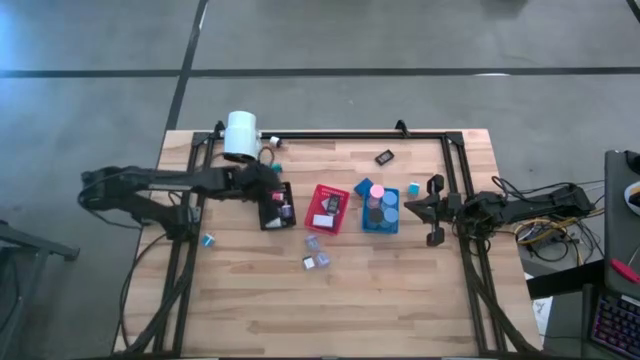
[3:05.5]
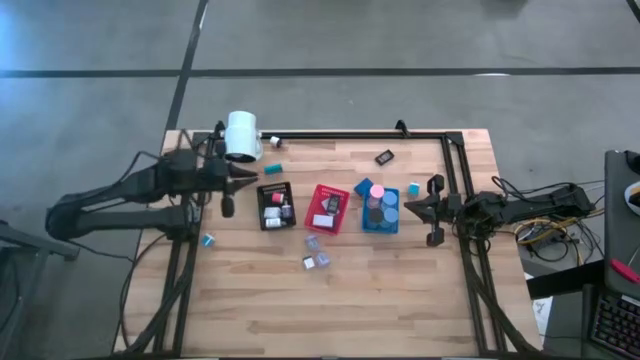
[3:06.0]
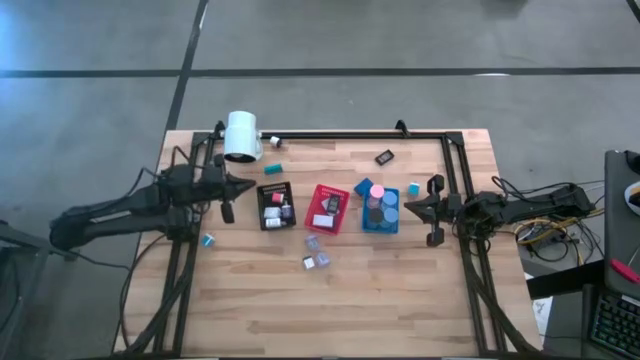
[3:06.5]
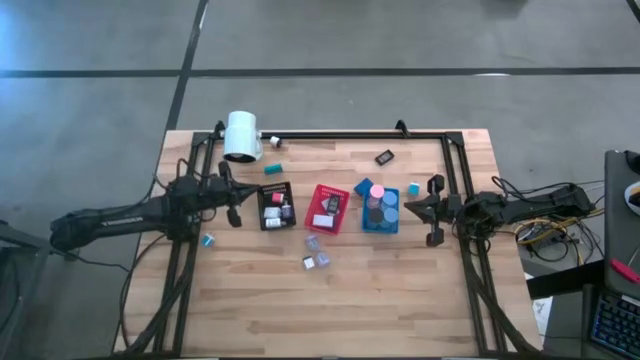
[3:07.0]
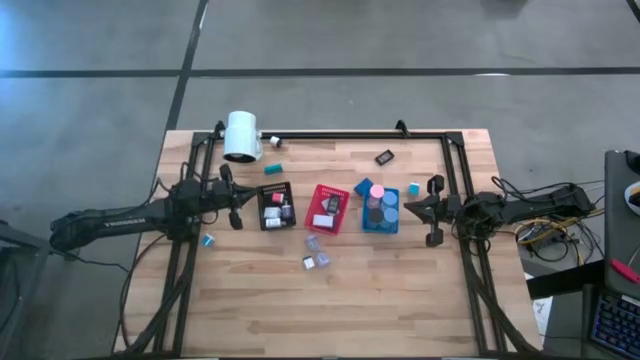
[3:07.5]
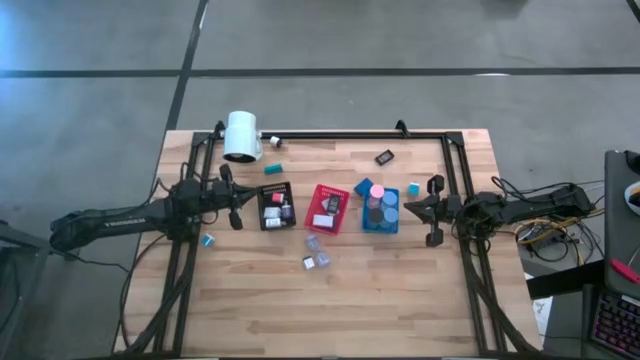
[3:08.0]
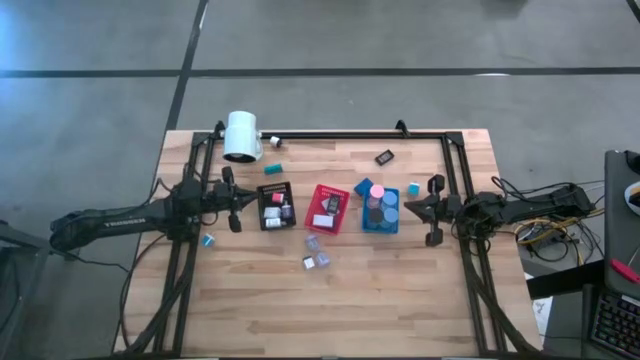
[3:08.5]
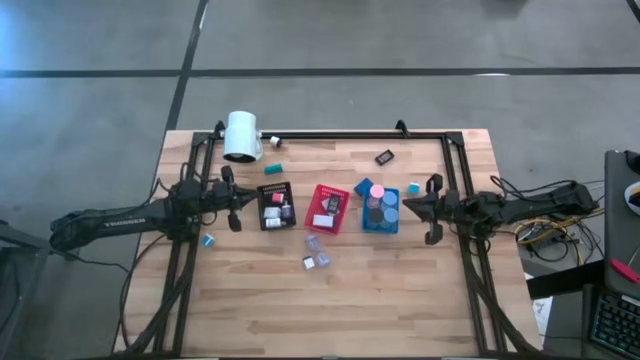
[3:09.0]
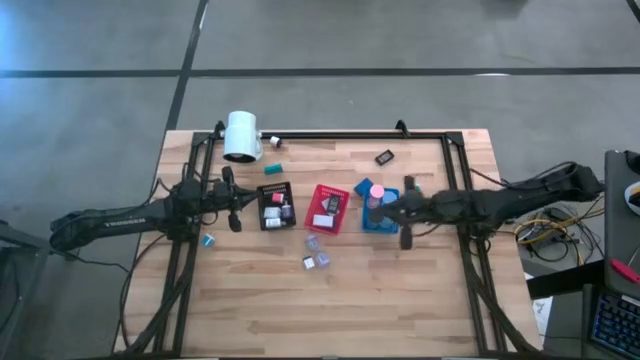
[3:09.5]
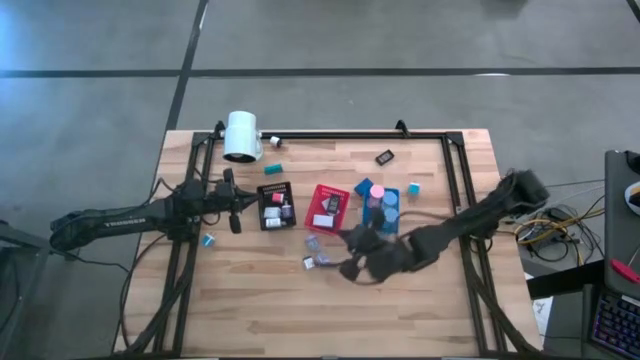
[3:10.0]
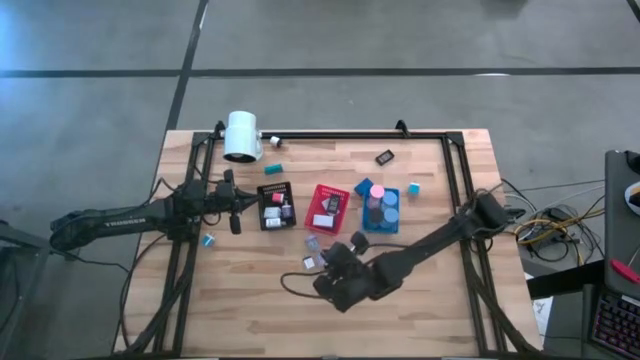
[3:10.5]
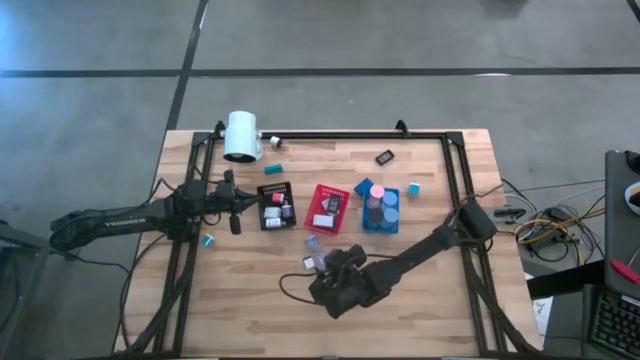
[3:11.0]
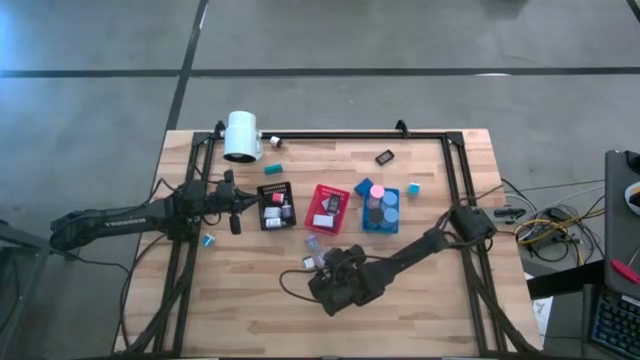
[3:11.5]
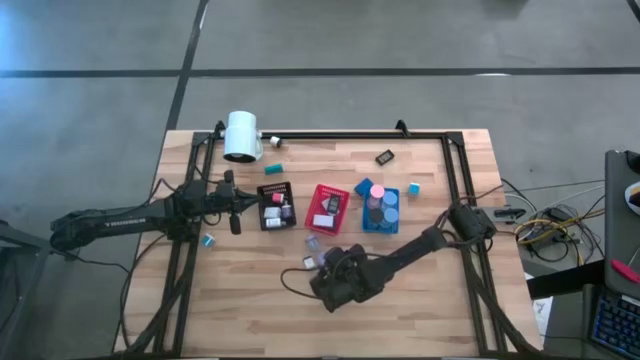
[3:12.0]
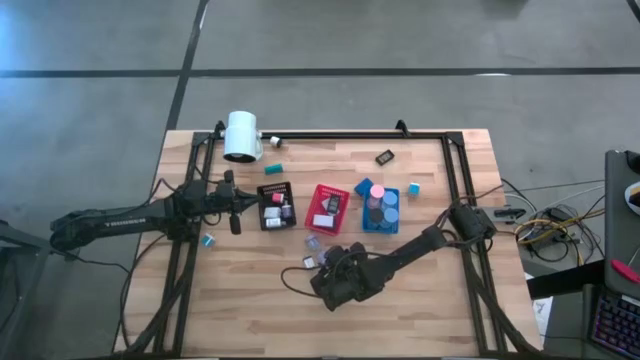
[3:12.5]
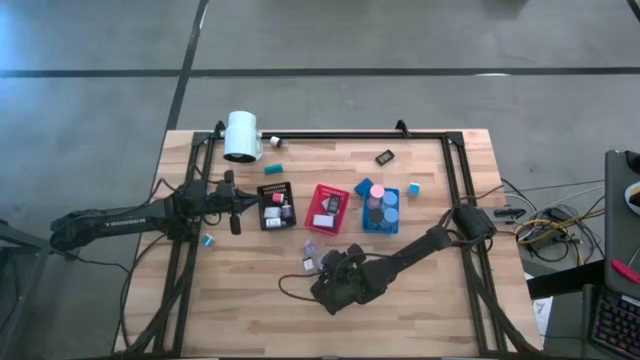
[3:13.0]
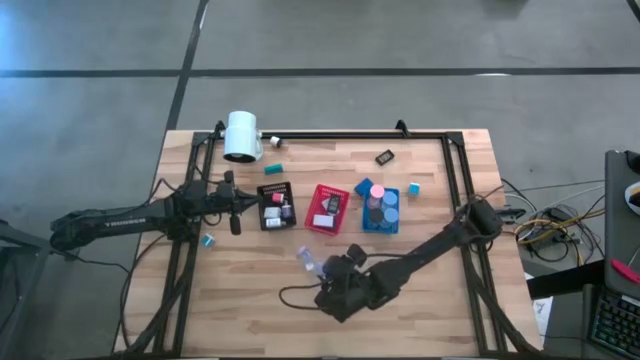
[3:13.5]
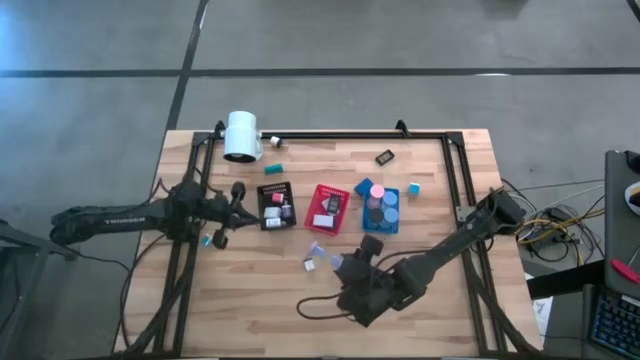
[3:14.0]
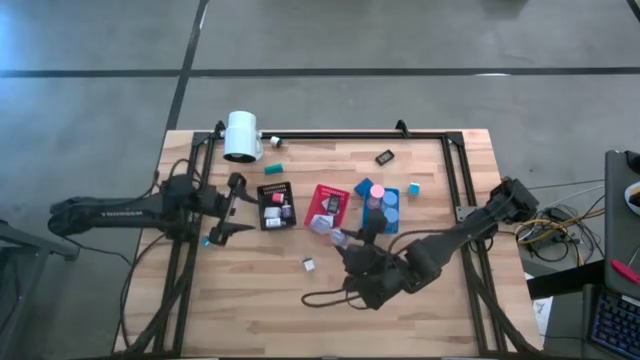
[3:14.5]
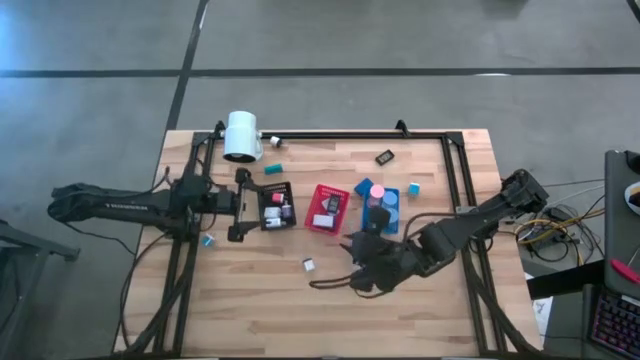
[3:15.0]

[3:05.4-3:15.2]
Task: Pick & Place Office items
Put the purple hourglass into the blue bin

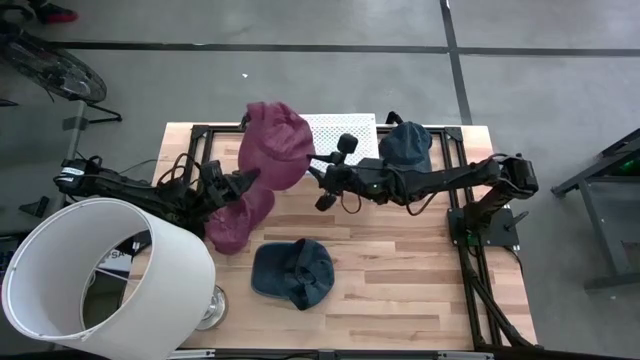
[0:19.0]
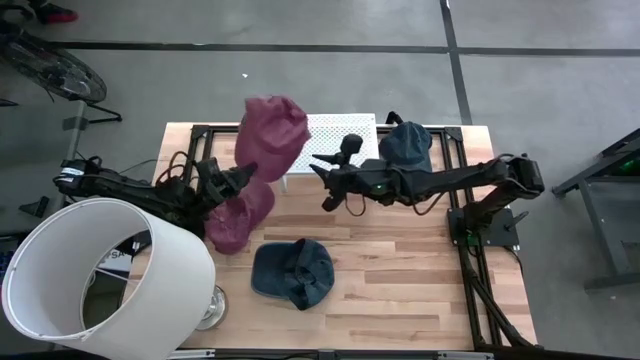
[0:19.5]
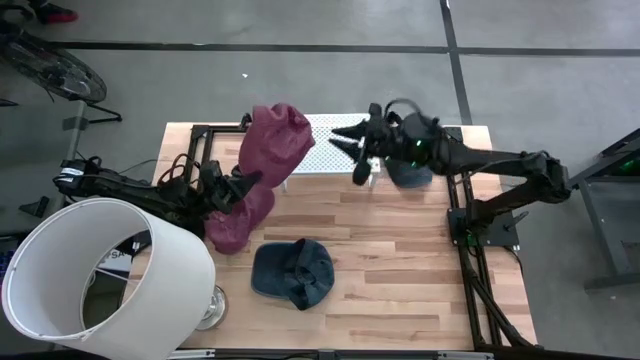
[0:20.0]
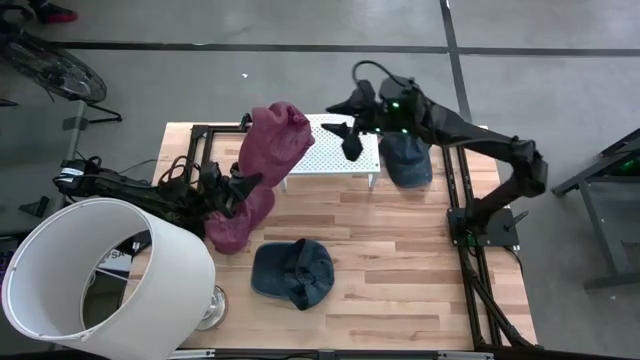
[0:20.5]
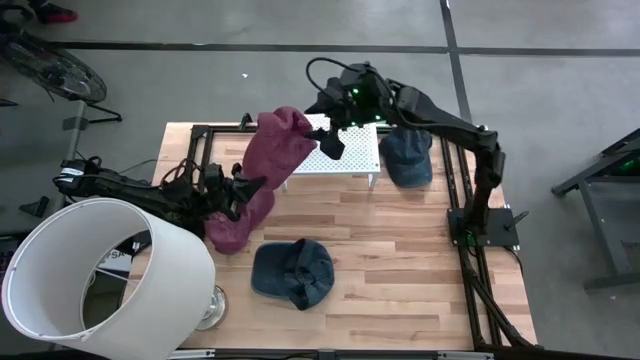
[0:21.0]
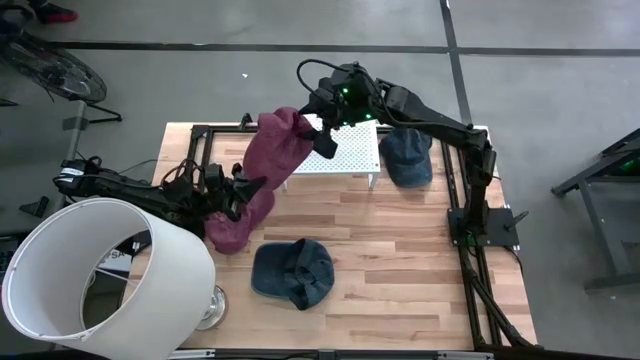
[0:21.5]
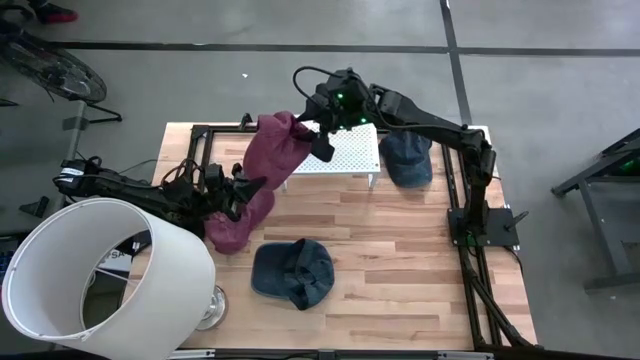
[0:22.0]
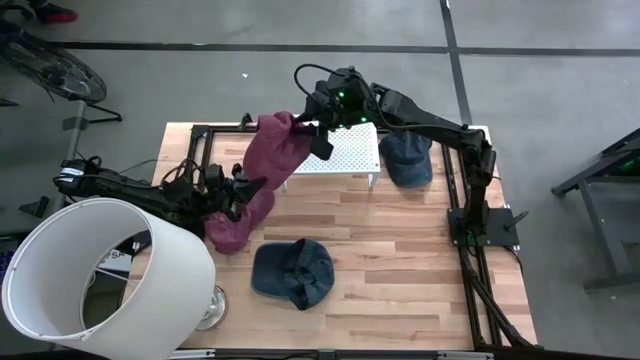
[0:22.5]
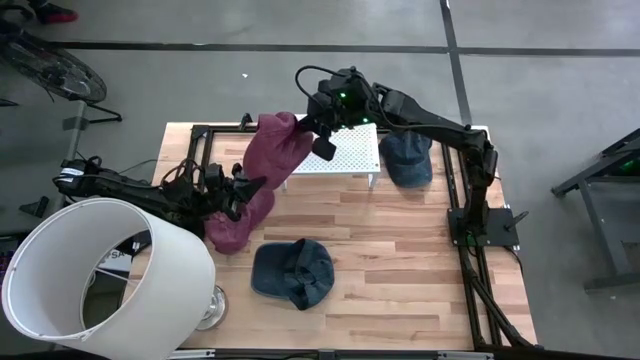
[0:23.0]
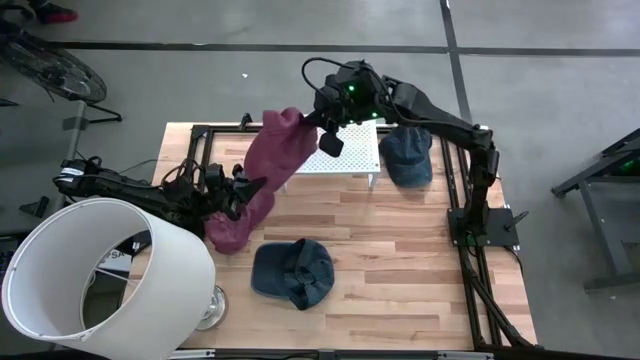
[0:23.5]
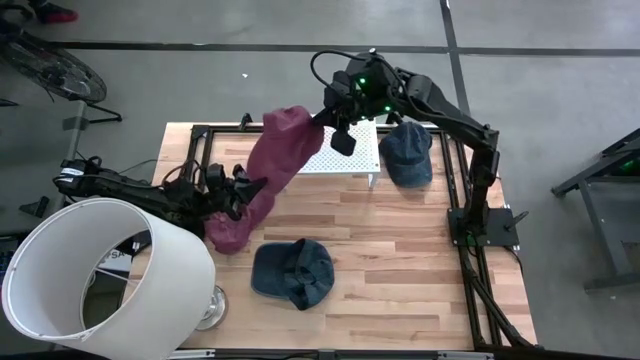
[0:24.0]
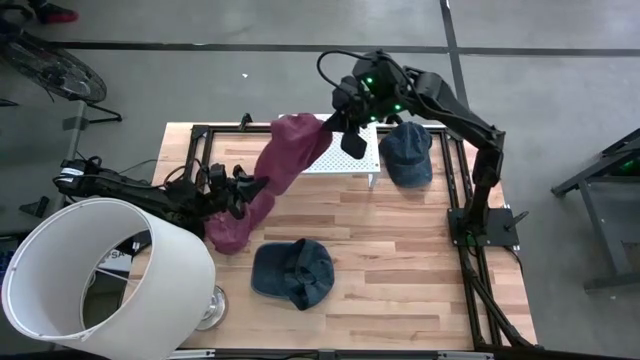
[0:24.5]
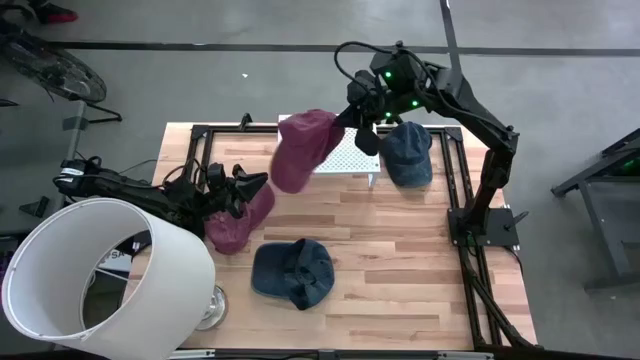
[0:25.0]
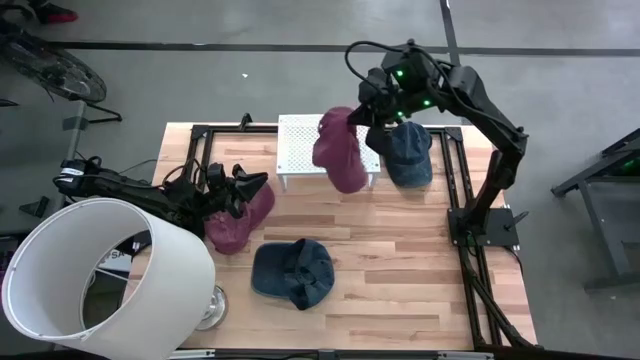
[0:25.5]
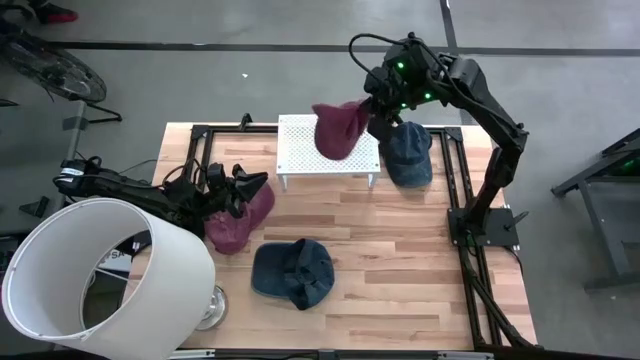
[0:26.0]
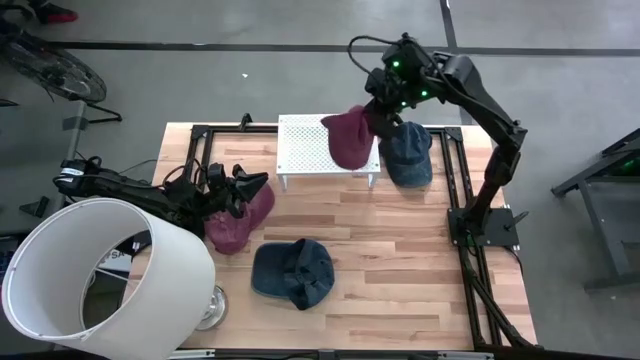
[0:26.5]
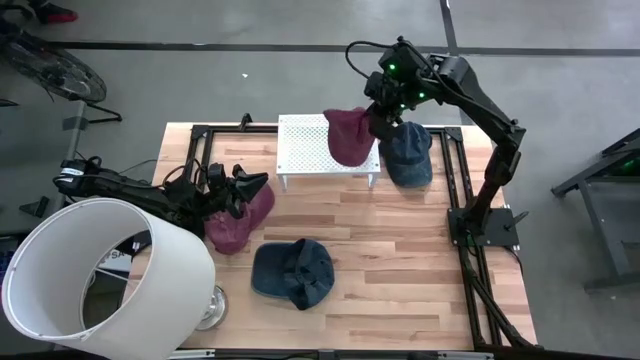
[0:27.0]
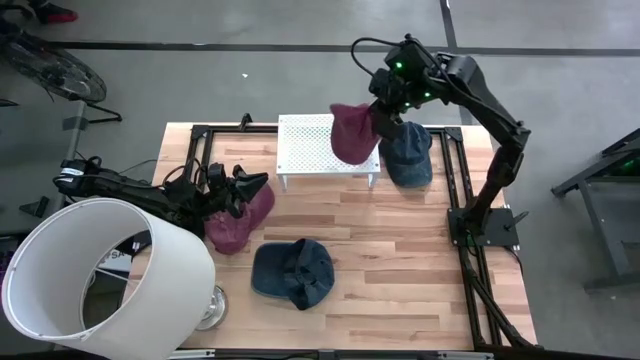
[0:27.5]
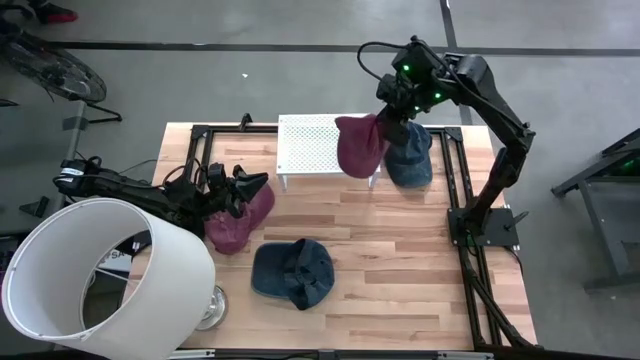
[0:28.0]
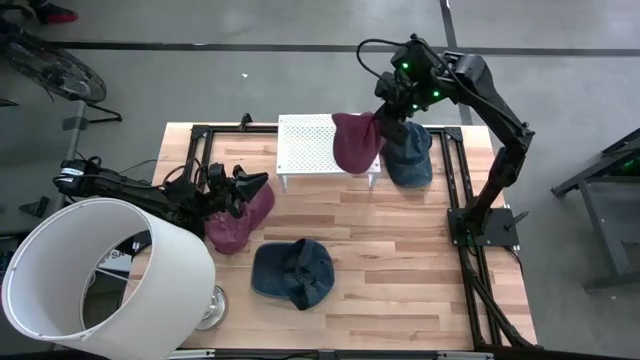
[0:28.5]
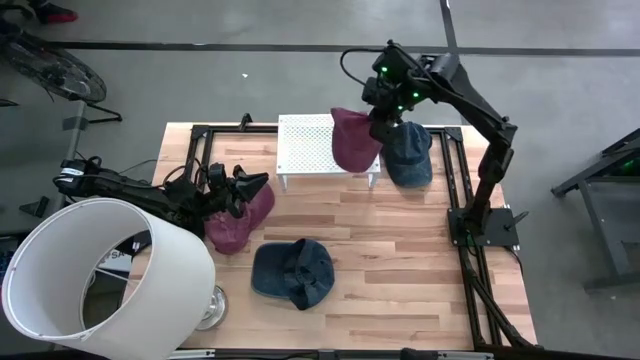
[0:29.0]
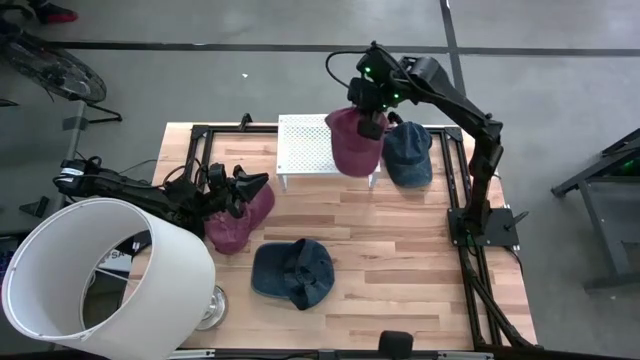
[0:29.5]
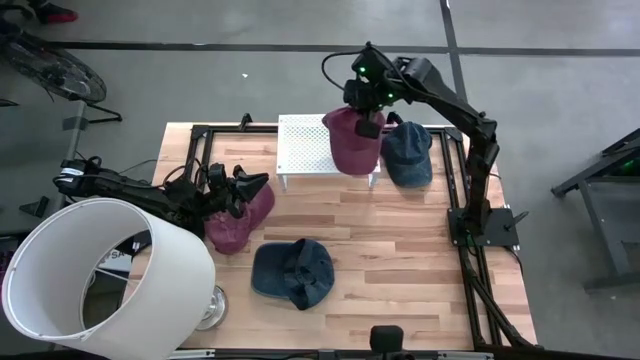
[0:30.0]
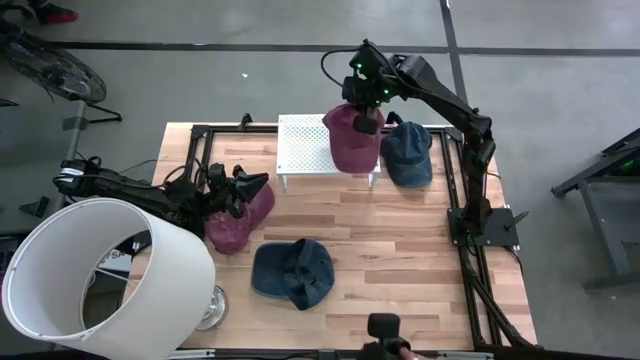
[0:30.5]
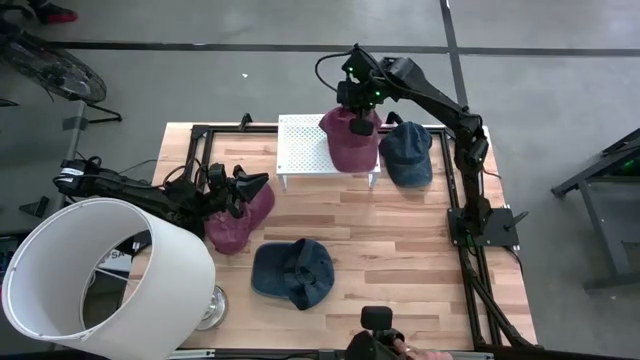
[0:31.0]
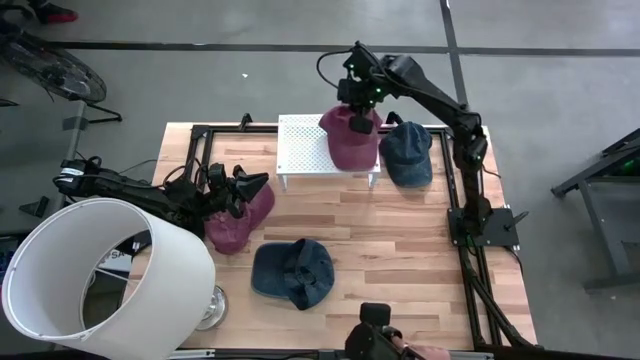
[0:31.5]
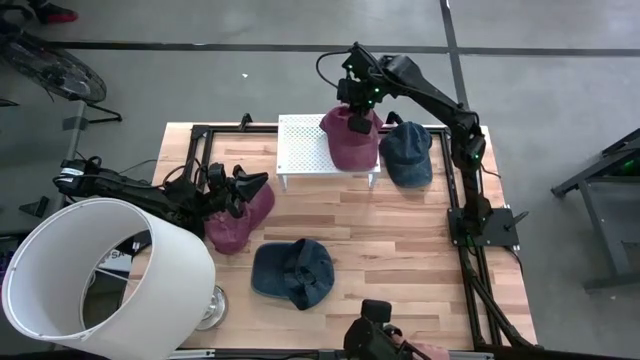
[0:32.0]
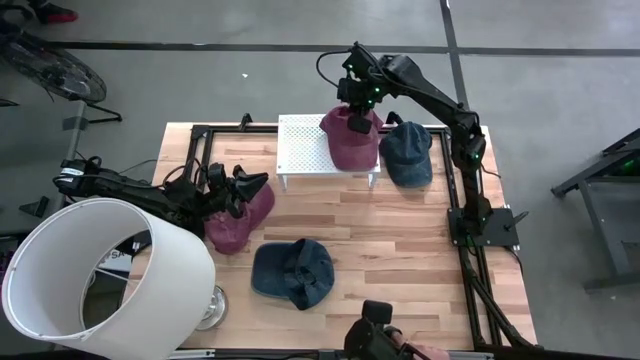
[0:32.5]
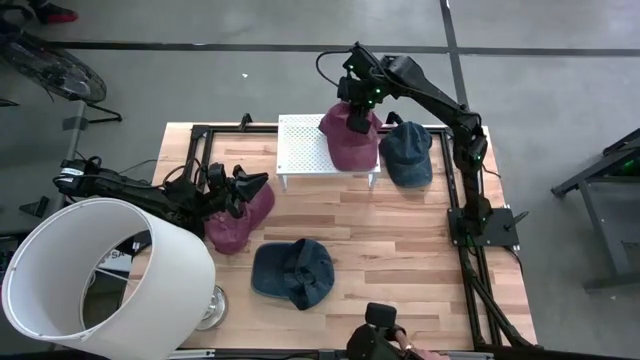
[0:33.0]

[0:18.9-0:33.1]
Task: Pick & Place hat
Put the right dark red cap on the shelf
